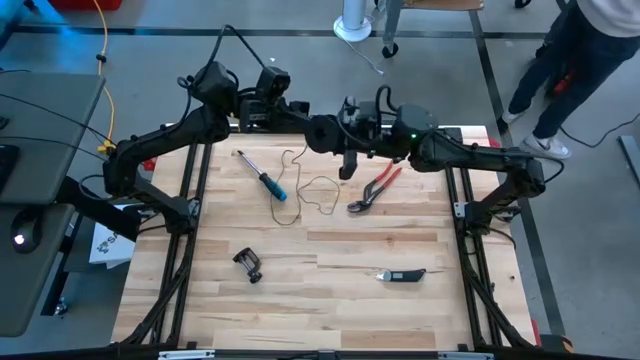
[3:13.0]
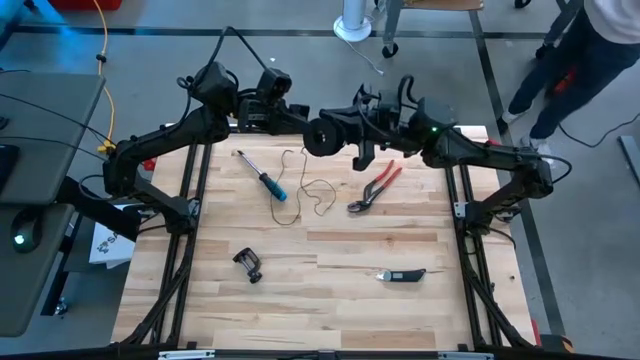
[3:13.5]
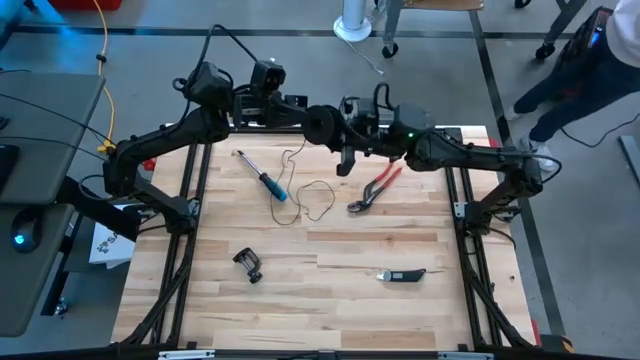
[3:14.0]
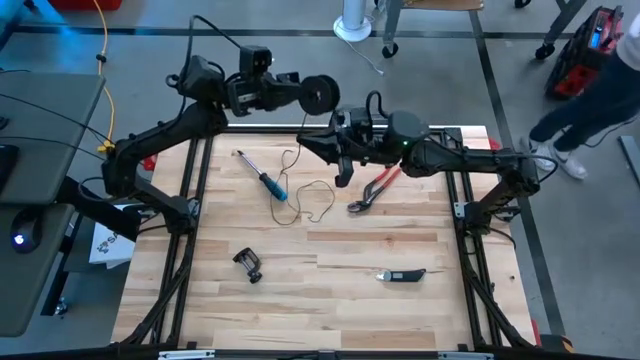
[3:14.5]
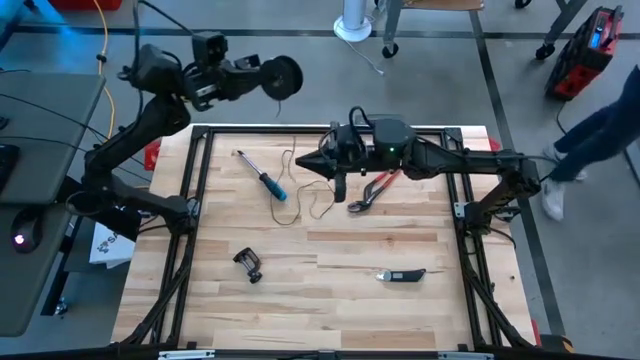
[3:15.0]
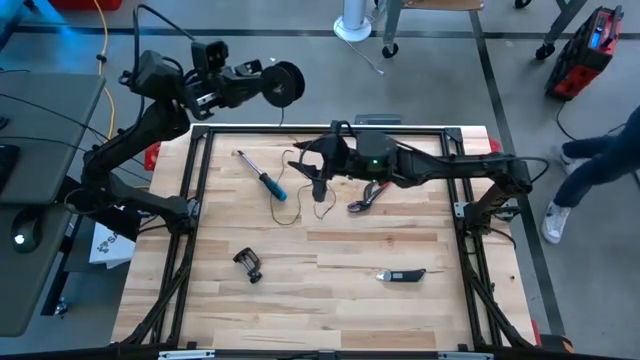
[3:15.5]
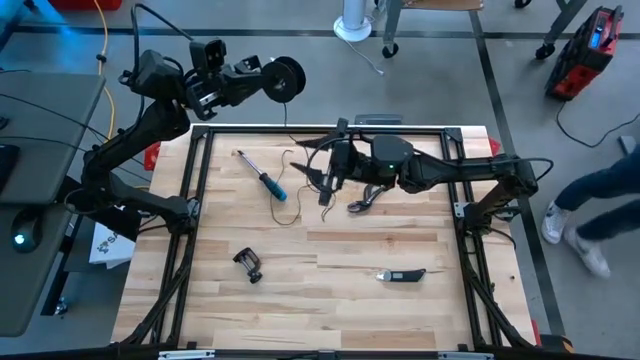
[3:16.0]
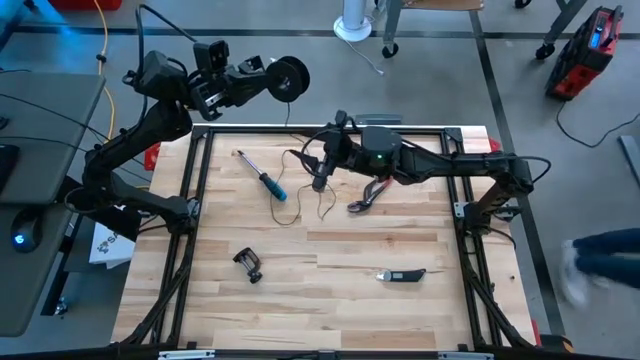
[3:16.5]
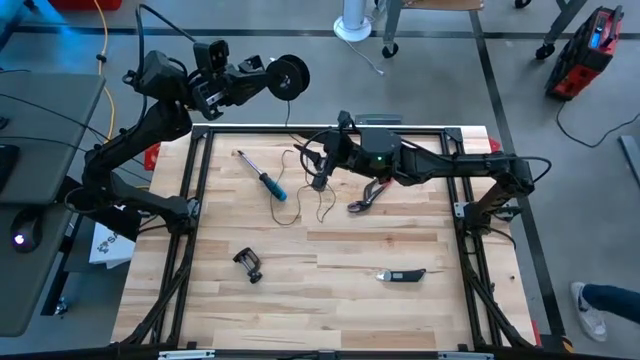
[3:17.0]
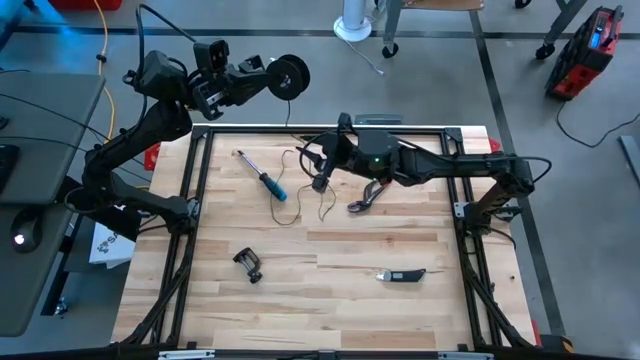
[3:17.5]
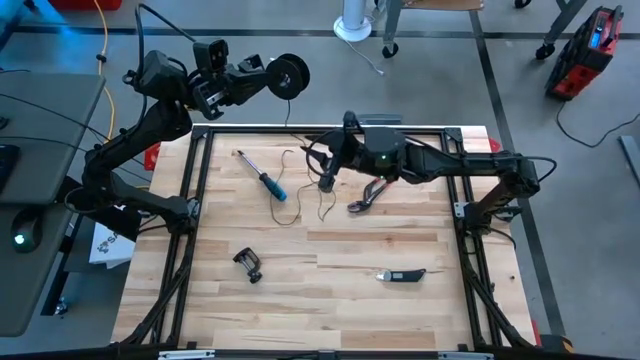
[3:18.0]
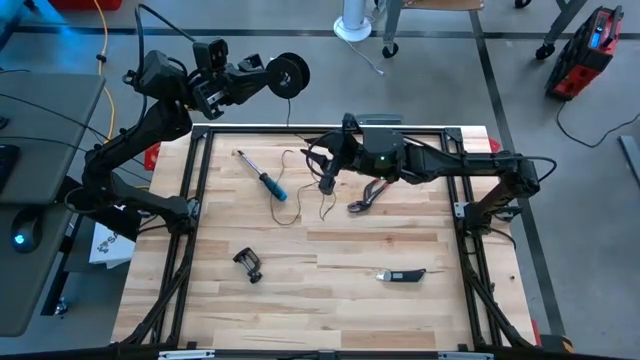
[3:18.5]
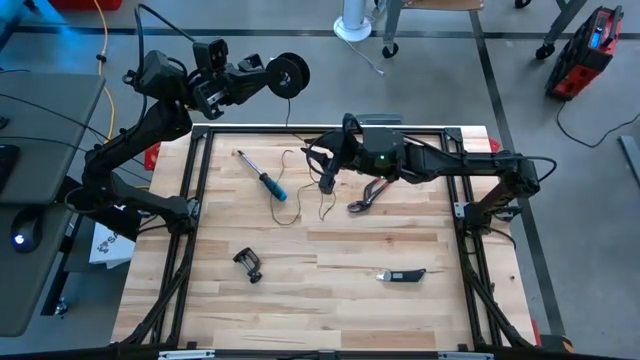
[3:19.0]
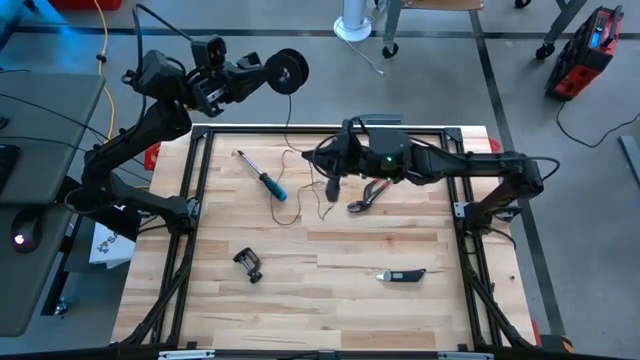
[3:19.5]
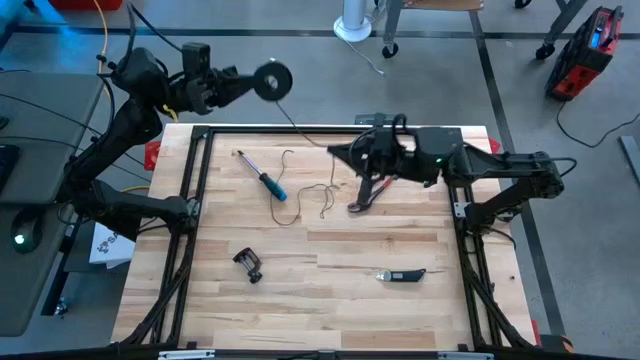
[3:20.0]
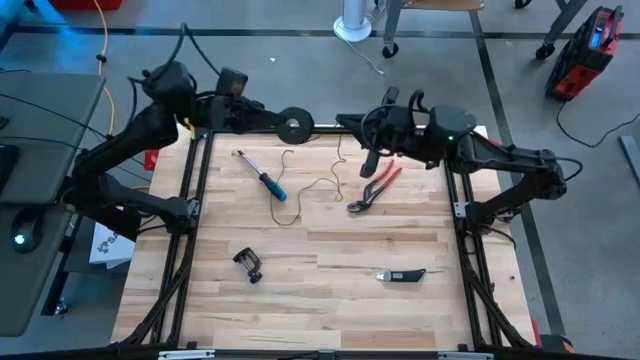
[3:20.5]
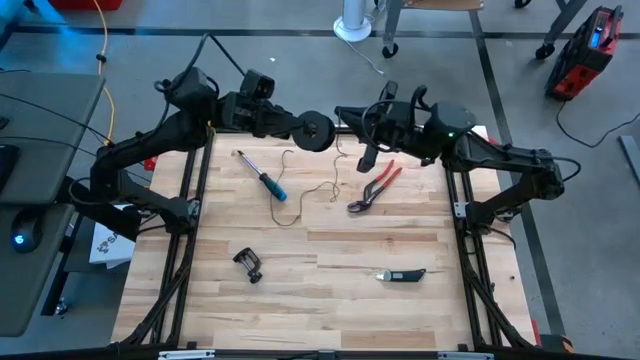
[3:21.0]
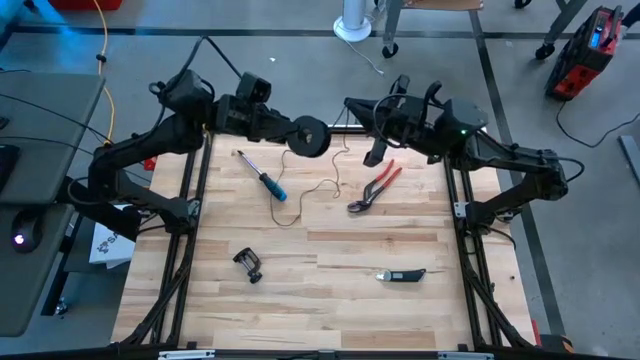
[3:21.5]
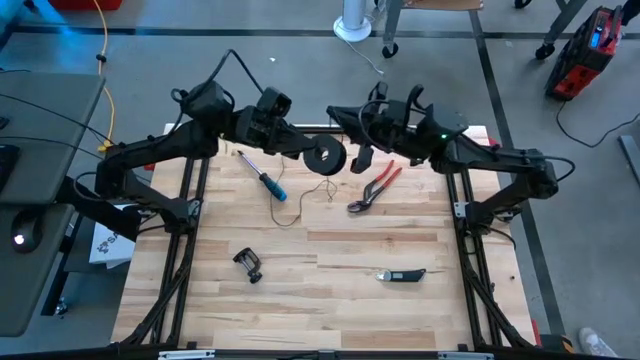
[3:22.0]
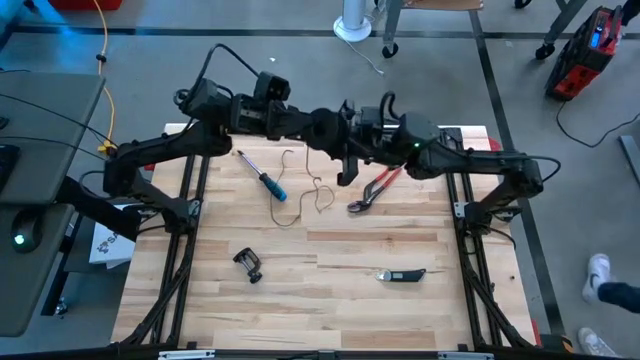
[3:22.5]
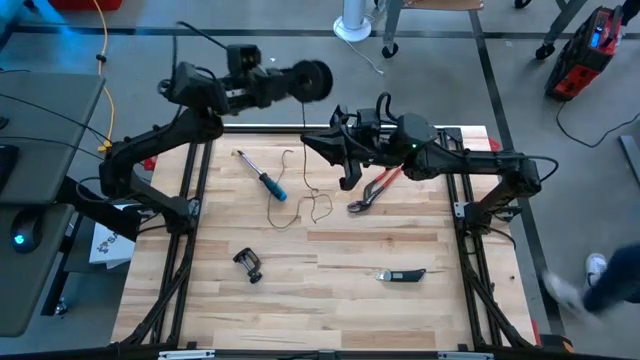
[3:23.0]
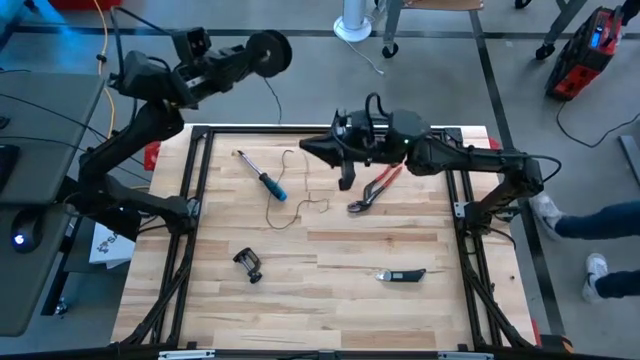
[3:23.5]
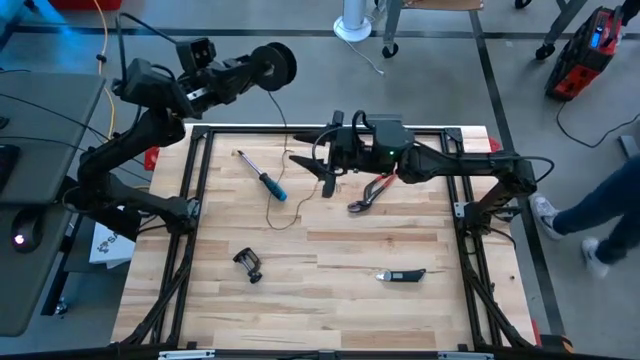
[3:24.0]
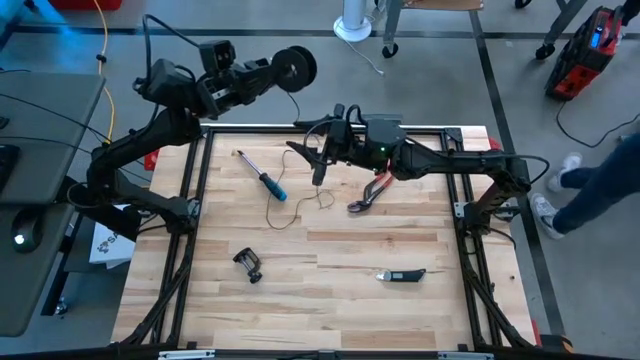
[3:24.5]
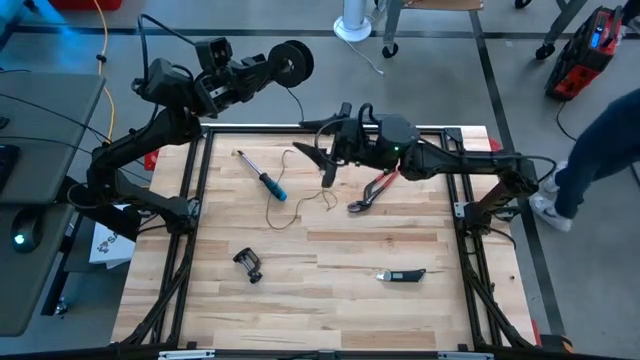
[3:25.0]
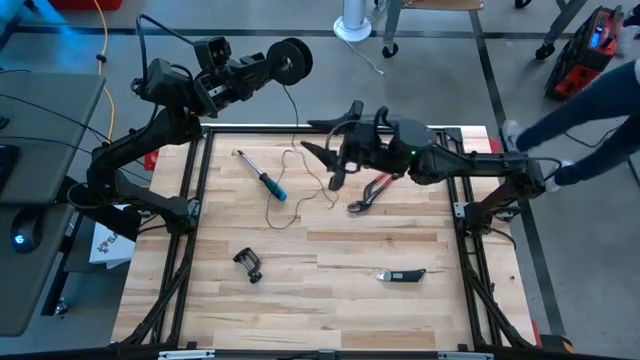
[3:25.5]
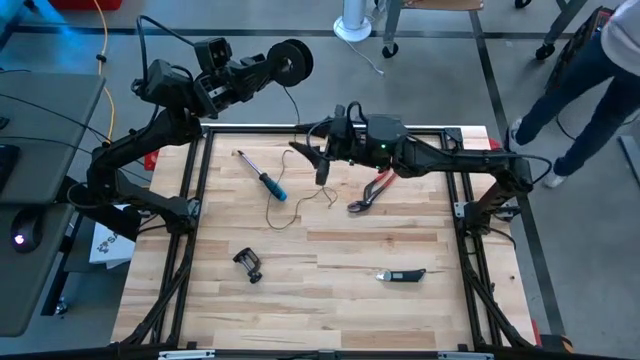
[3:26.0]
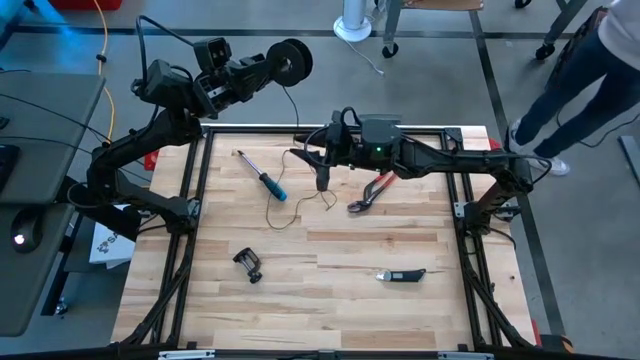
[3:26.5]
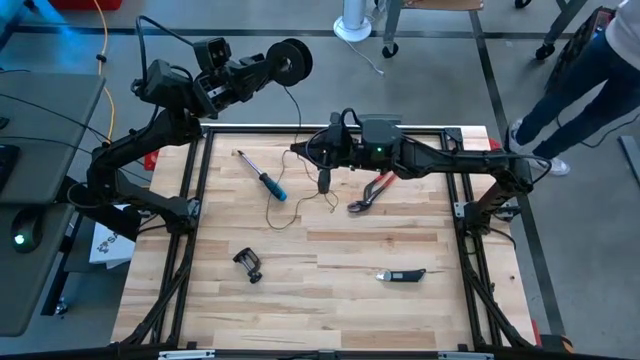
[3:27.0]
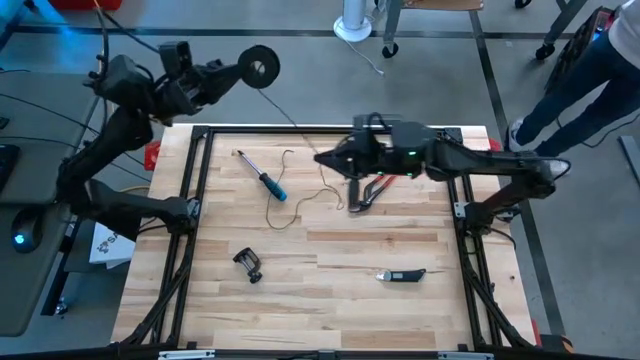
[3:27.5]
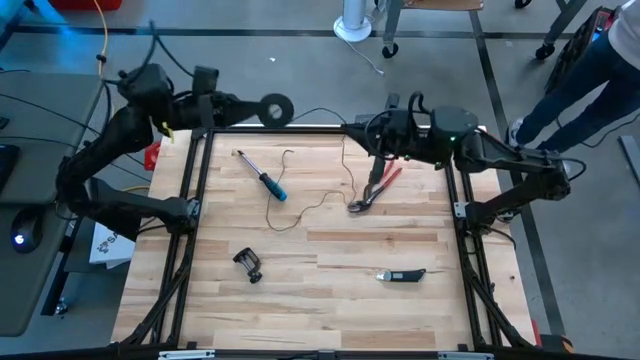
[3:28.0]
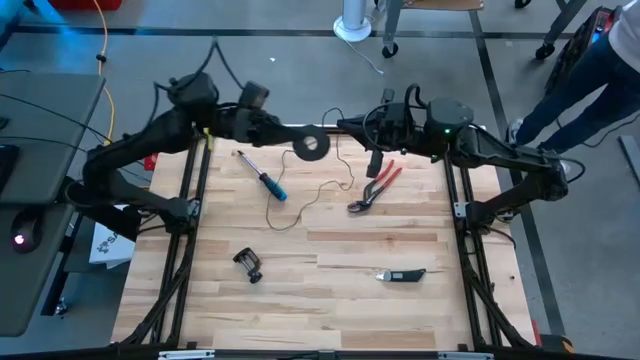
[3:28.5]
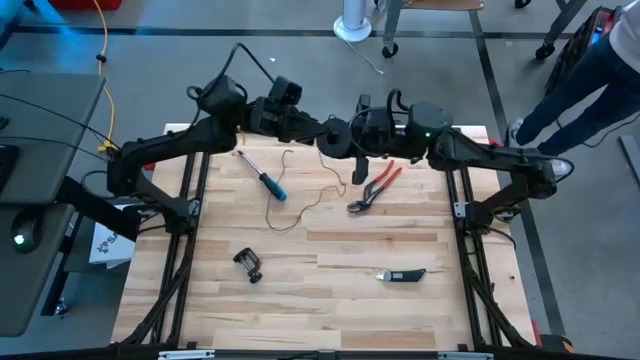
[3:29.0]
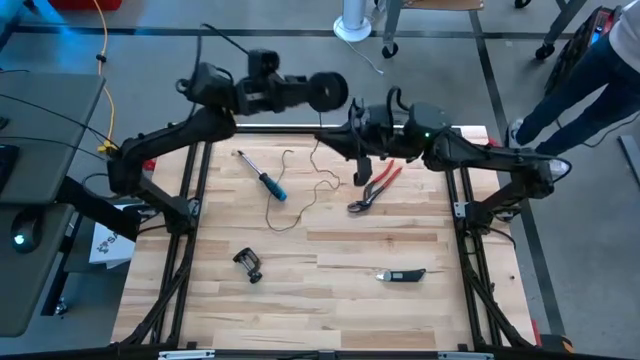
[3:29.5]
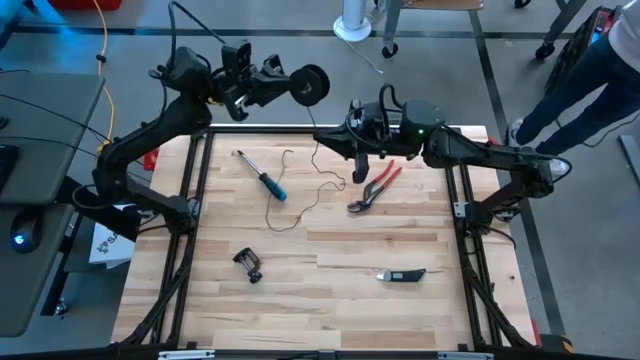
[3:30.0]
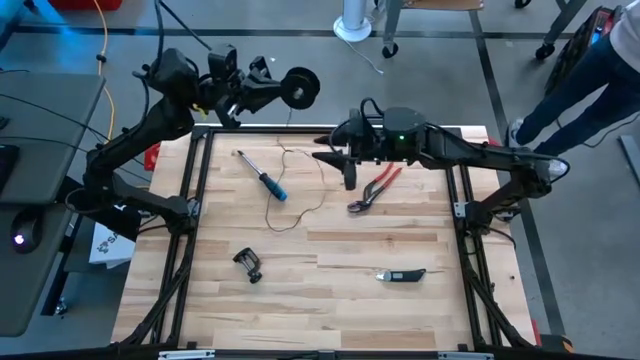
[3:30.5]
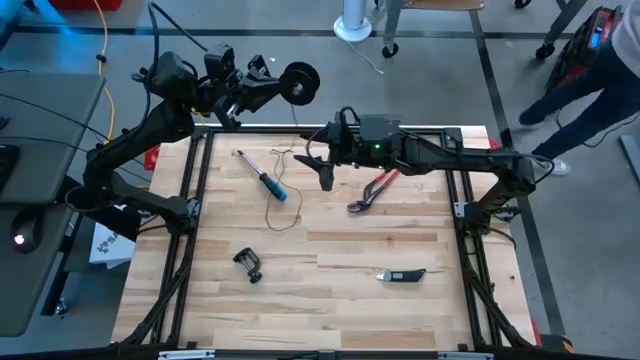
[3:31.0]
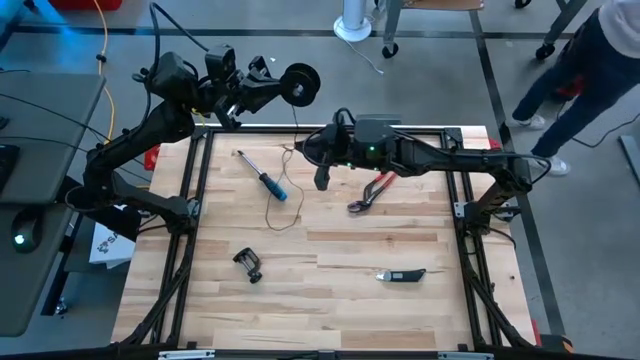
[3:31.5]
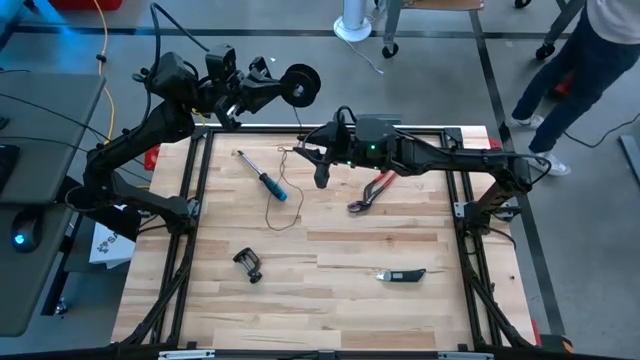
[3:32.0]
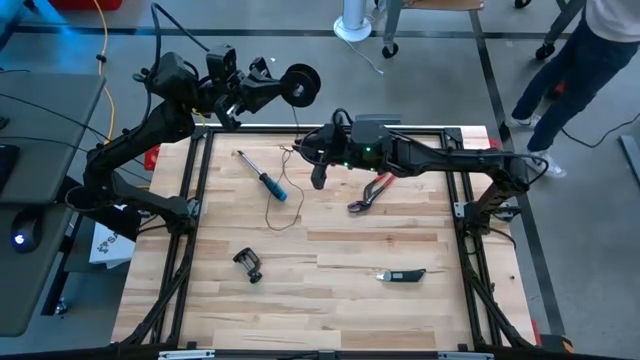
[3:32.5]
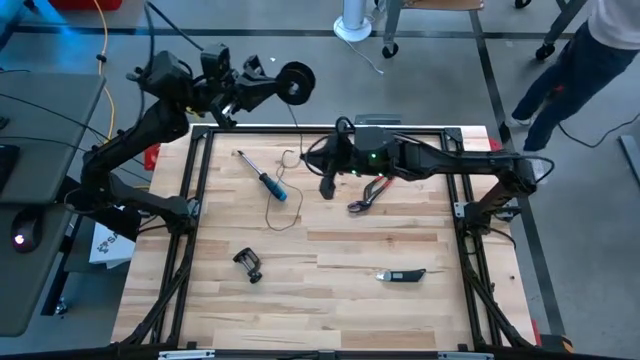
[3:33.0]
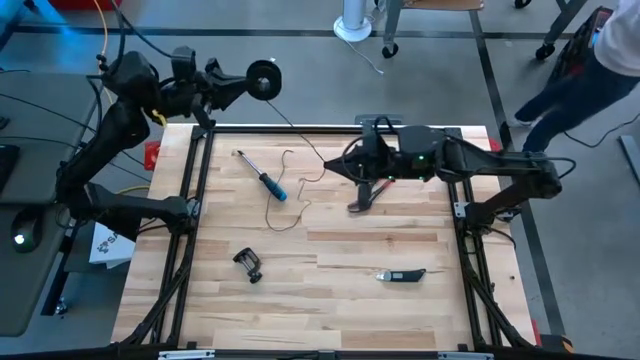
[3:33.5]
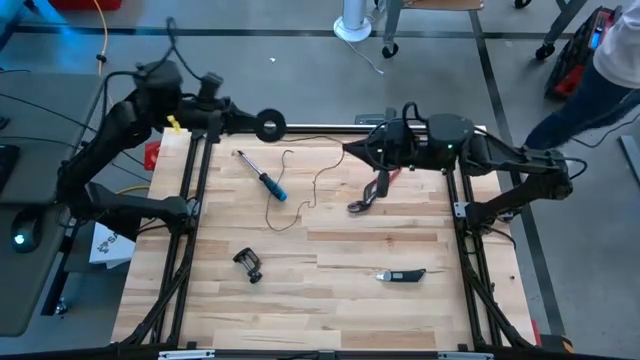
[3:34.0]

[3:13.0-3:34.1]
Task: Coil cords
Coil the black wire onto the black spool
